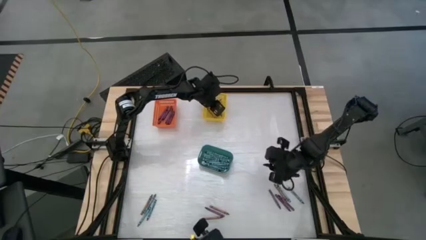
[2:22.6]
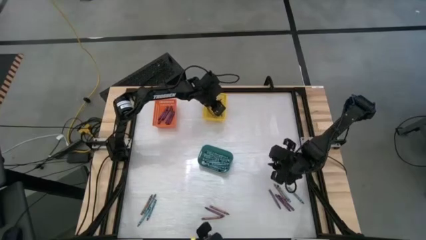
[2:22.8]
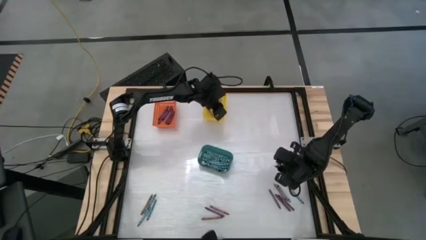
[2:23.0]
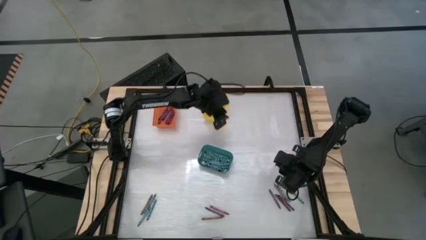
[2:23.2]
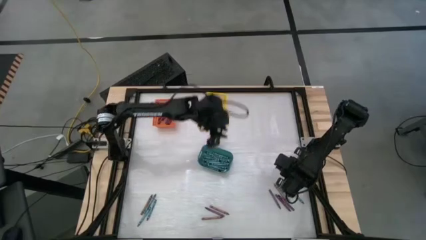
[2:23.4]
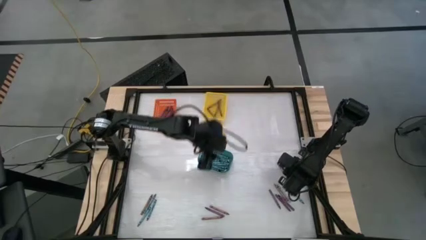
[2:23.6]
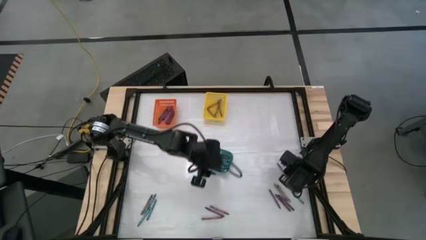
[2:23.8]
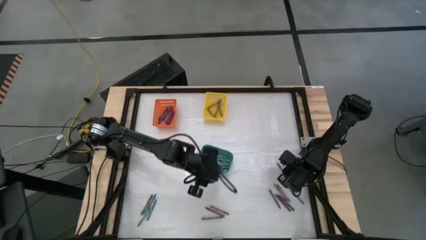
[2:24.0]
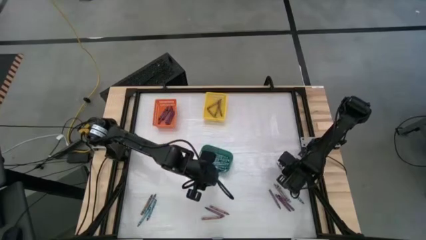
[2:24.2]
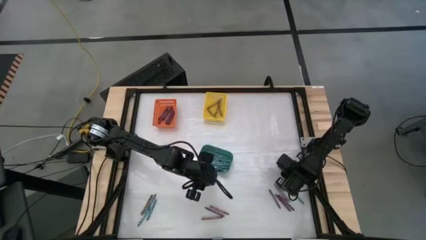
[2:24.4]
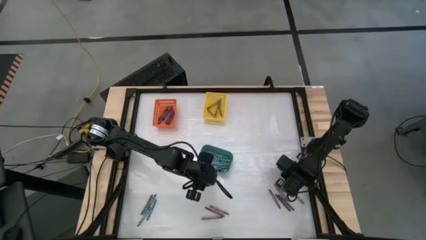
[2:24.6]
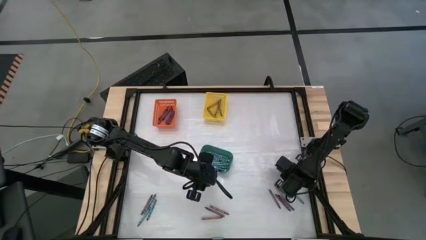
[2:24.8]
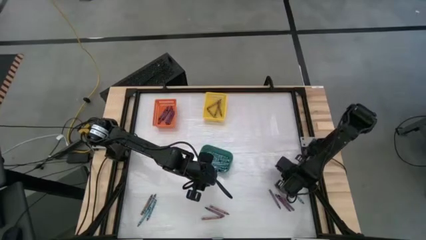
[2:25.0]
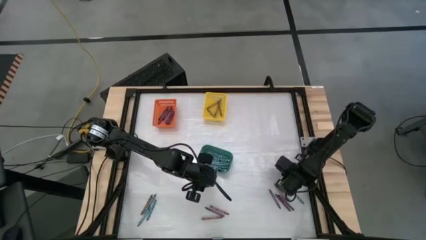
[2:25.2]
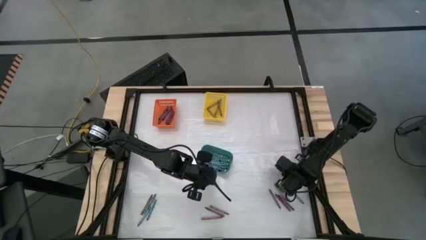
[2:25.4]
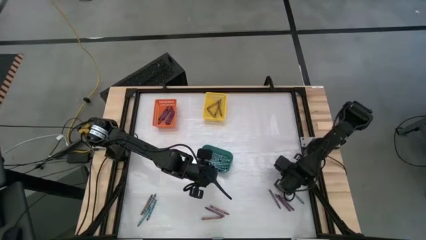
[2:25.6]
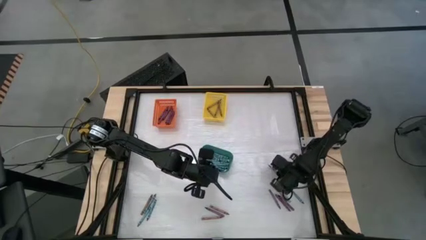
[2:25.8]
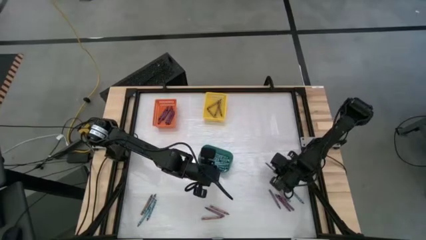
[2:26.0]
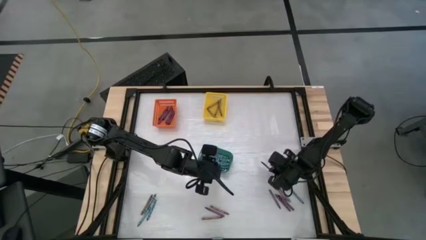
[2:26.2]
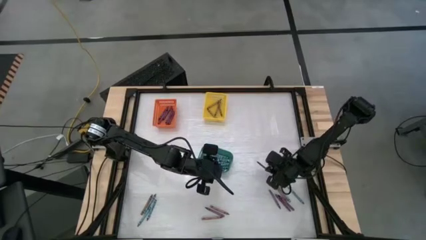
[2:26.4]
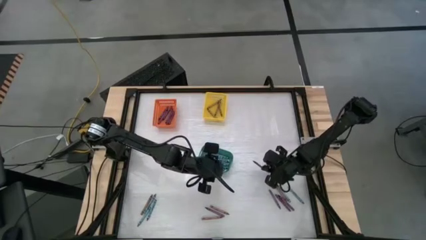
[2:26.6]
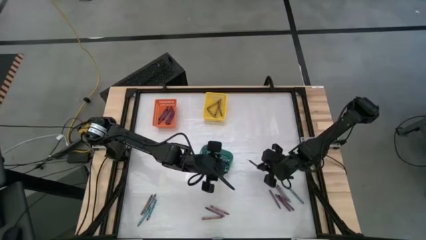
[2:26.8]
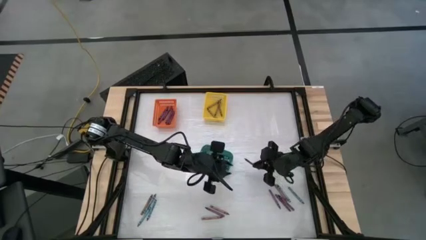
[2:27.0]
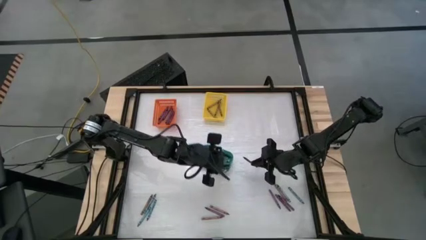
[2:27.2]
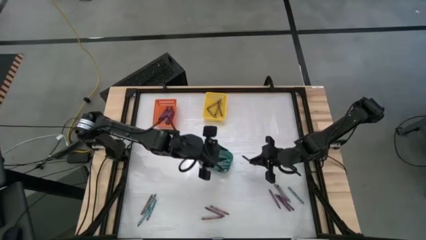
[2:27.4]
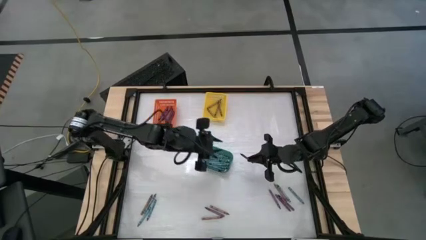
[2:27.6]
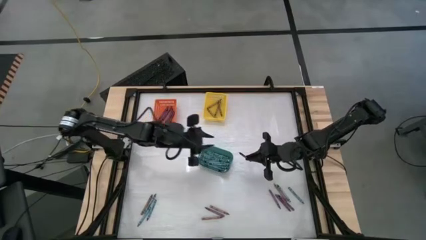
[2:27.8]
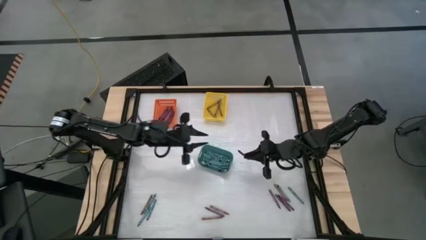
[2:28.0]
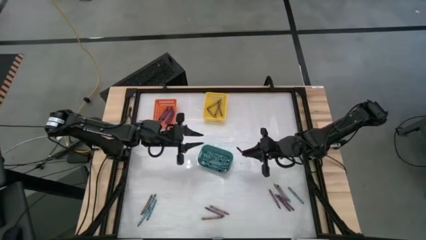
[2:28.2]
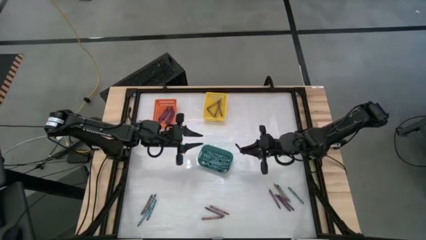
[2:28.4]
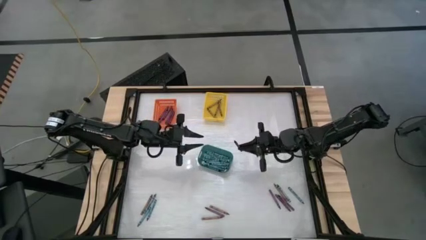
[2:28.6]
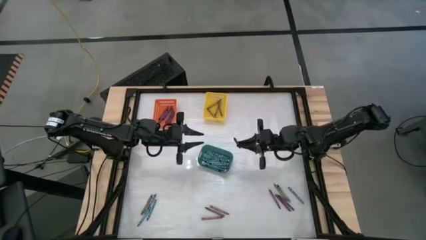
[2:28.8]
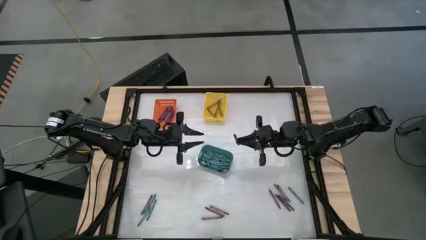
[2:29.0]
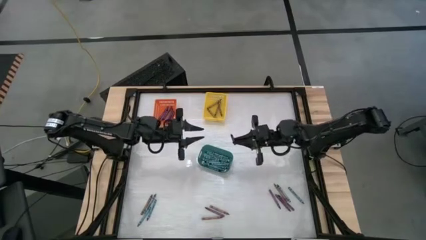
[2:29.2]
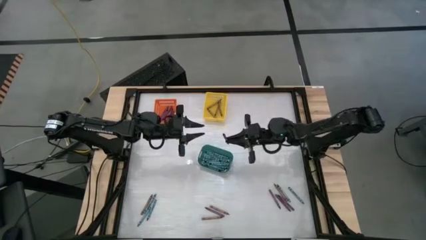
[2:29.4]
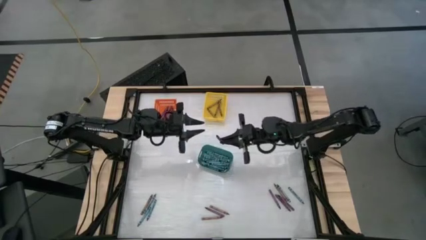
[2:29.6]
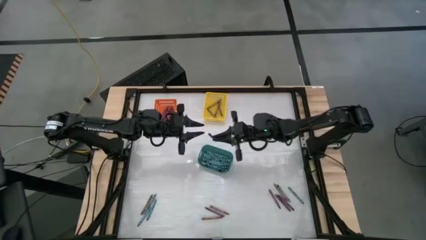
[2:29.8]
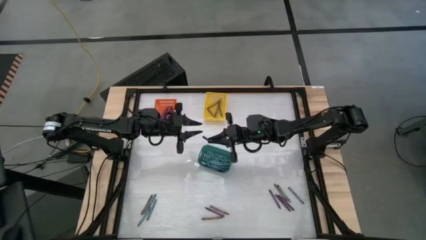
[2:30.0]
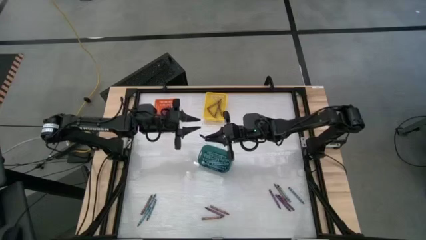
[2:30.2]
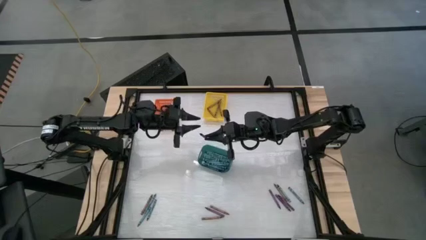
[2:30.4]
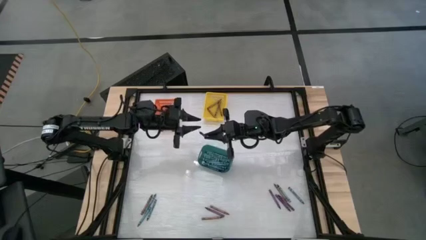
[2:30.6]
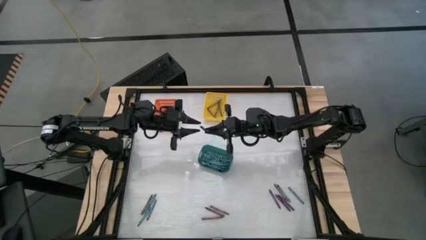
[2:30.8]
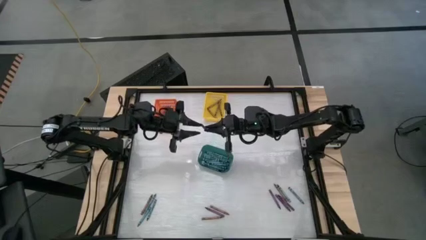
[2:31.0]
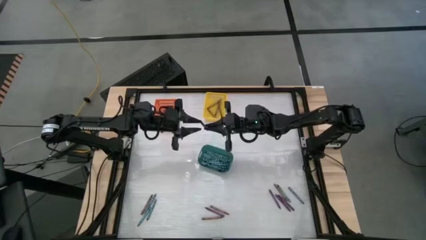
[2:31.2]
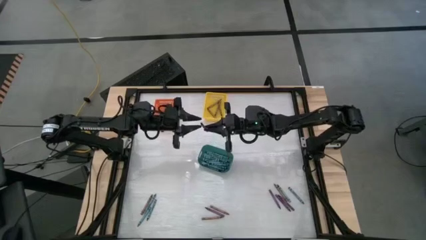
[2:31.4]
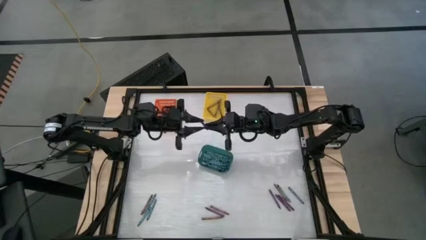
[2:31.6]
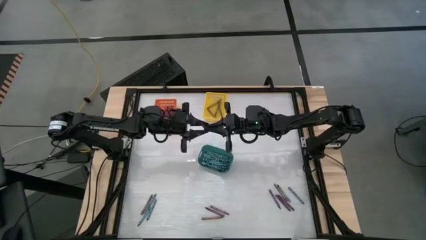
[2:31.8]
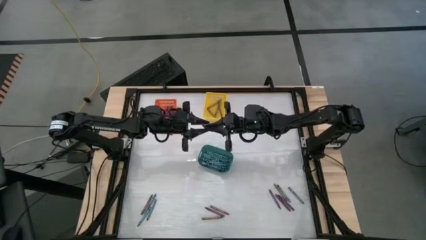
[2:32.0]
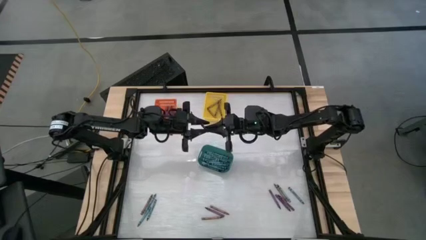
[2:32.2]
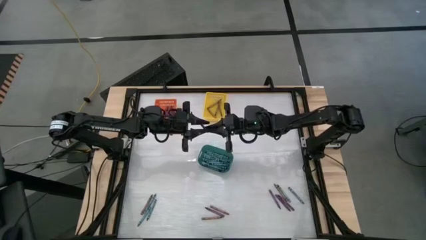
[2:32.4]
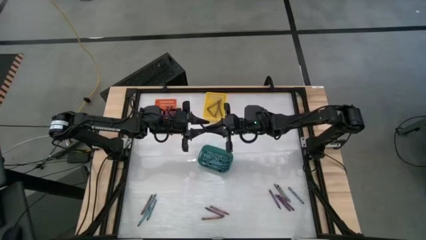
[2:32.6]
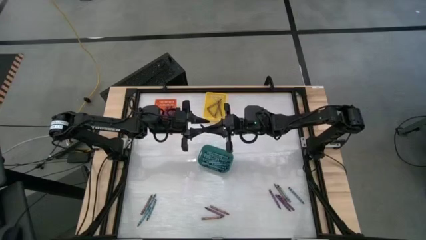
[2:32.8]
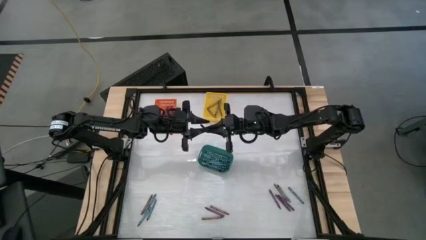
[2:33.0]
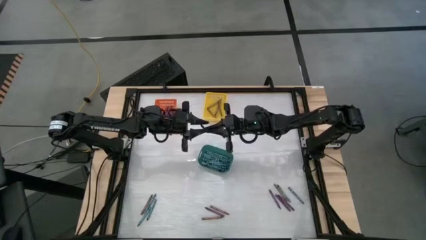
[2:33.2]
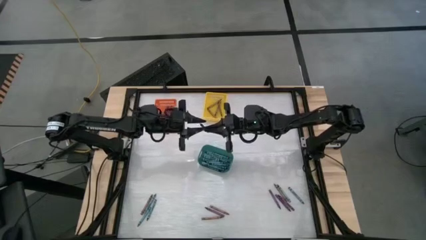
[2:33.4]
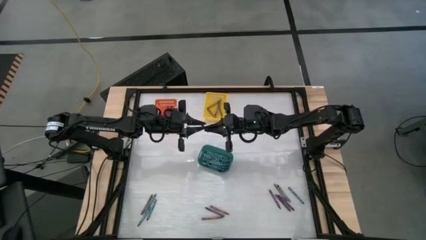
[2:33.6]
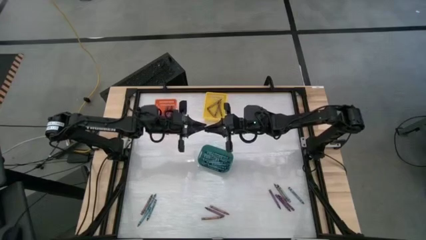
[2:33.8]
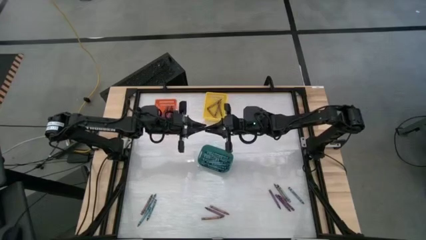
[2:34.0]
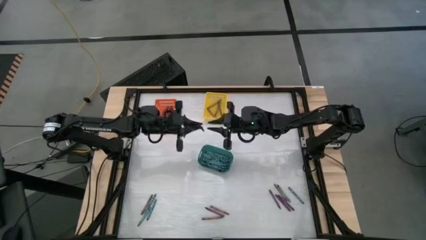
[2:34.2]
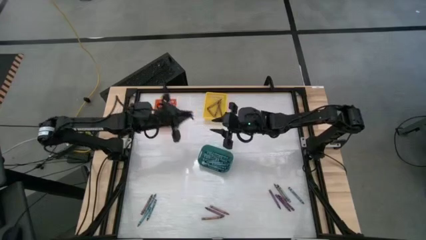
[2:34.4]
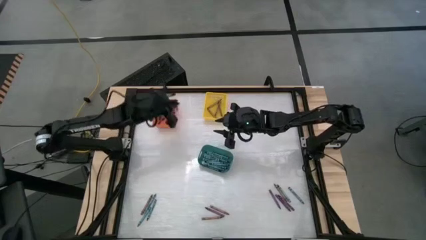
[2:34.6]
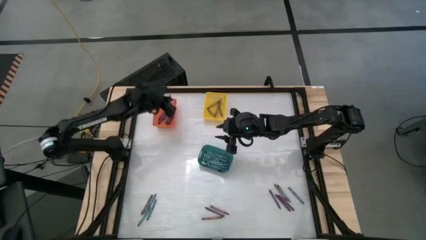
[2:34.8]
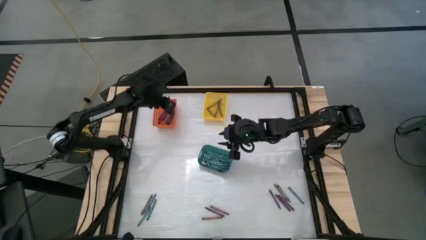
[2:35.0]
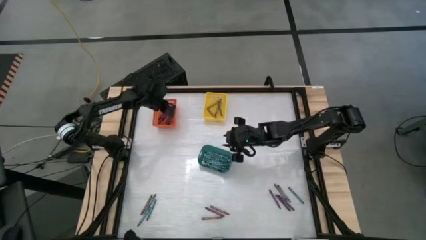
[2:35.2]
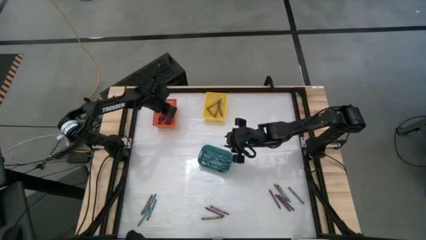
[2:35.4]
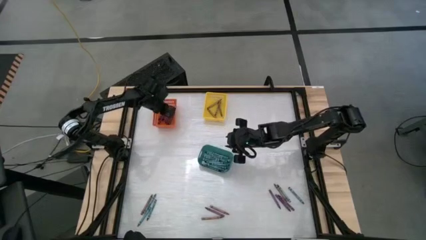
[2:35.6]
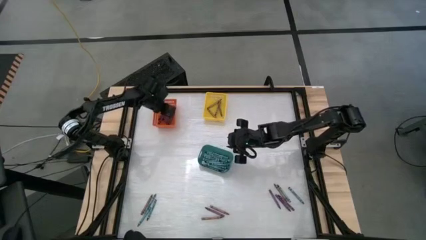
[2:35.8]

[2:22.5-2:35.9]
Task: Sort crayons
Put the violet crayon into the orange bin

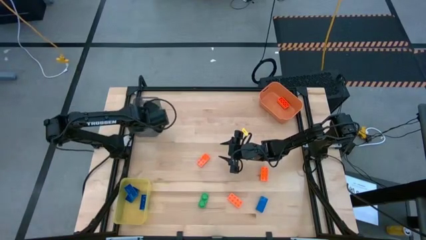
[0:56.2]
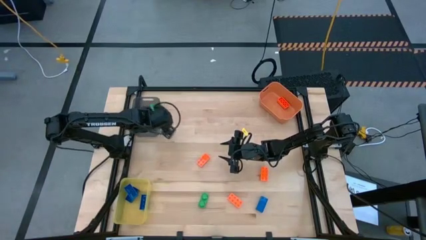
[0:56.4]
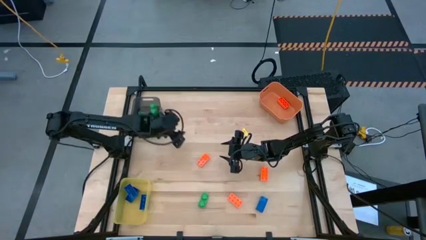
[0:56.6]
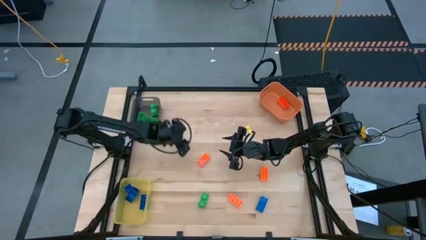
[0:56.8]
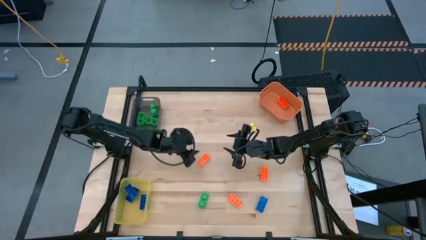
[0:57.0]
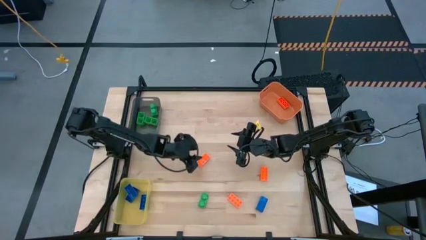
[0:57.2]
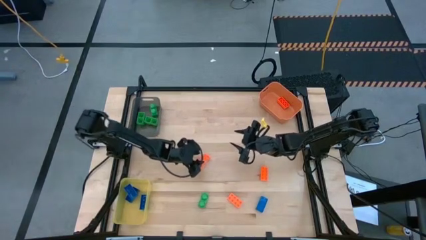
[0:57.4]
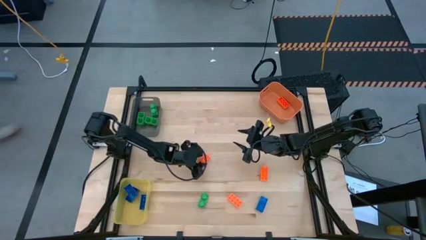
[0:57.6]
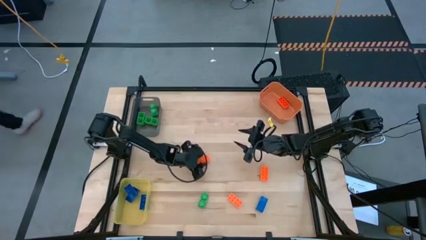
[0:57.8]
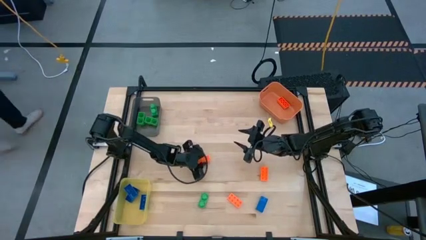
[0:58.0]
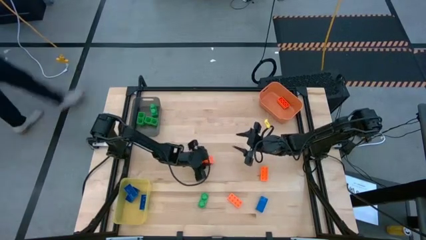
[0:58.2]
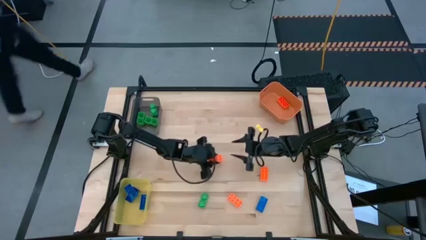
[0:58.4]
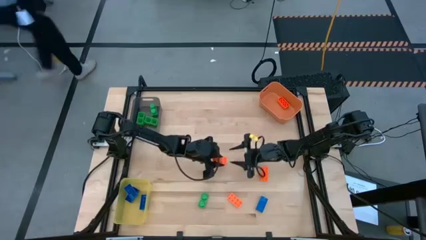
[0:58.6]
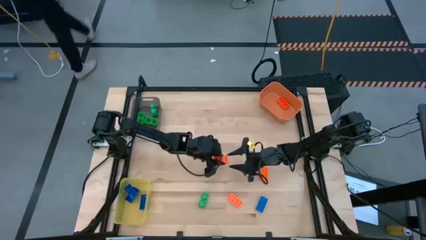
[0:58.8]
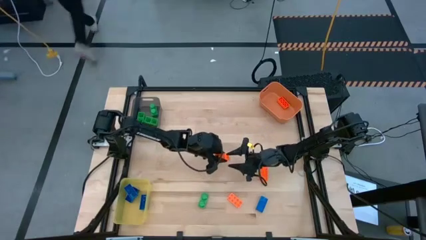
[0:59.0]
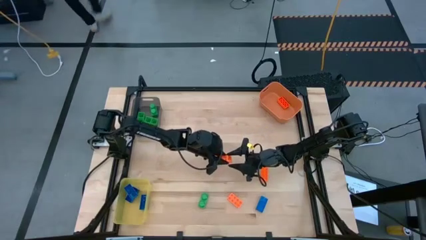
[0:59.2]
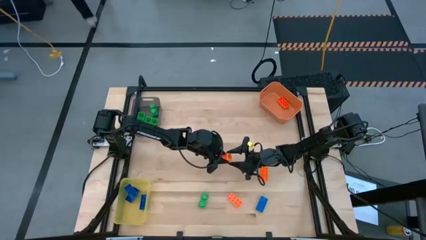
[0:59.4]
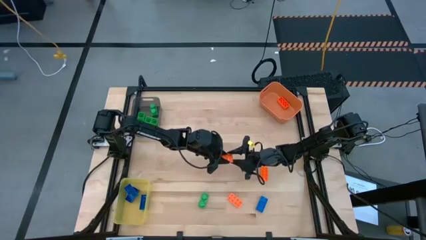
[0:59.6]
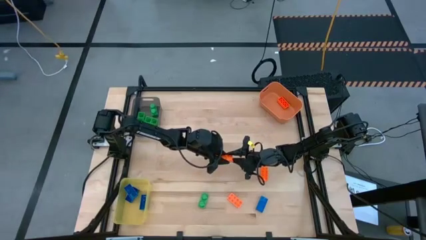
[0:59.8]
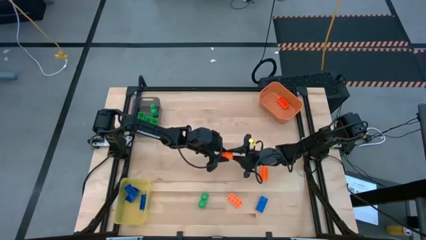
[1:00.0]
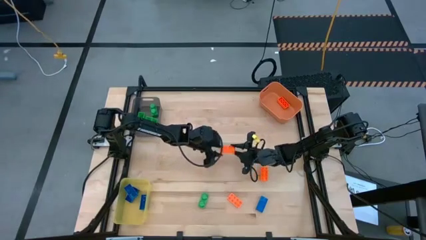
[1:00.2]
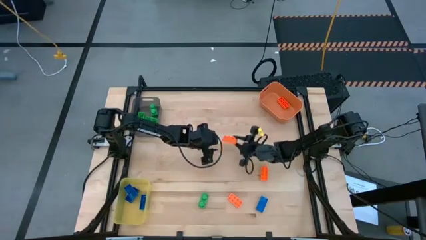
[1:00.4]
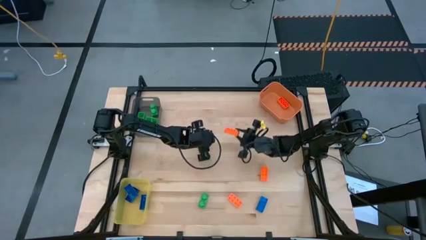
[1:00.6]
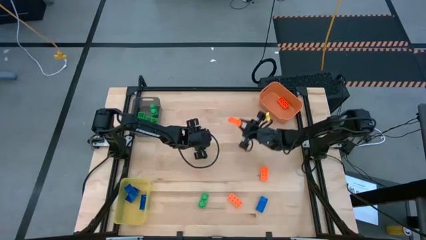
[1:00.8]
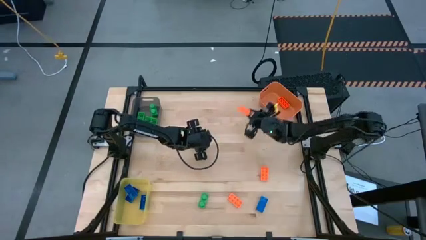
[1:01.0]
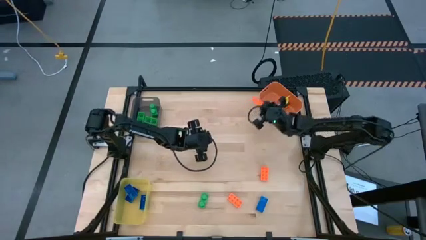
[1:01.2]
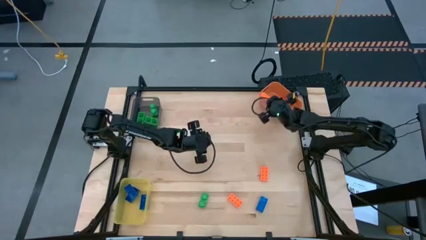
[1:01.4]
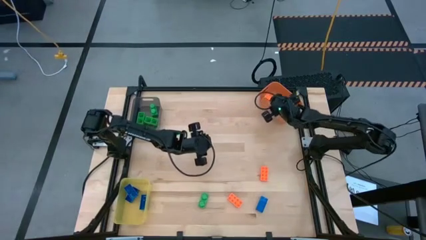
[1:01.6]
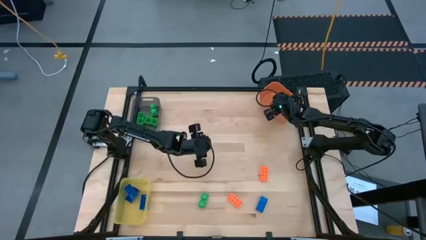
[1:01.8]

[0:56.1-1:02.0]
Task: Sort & place blocks by color
Put the orange game piece into the orange bin
